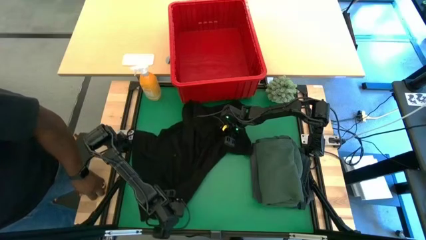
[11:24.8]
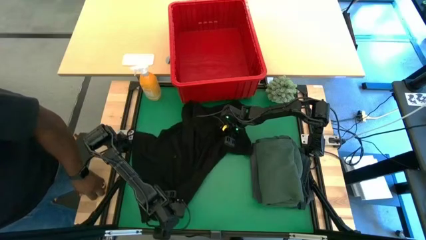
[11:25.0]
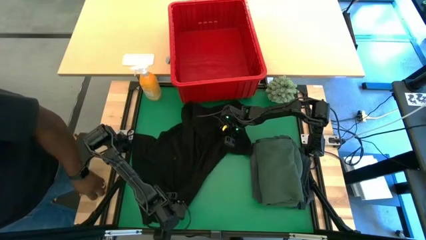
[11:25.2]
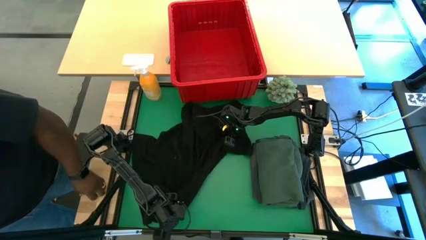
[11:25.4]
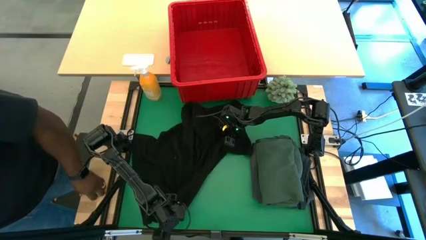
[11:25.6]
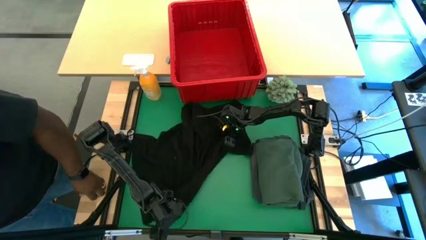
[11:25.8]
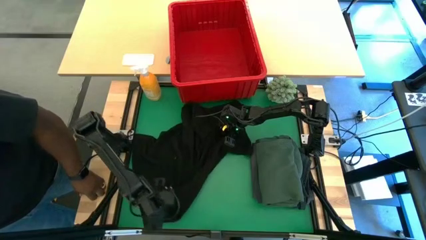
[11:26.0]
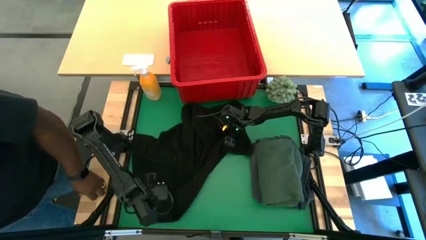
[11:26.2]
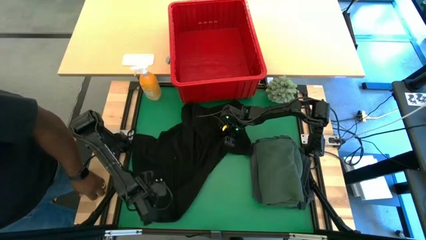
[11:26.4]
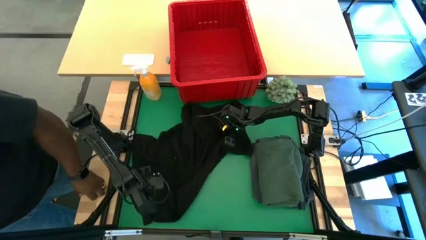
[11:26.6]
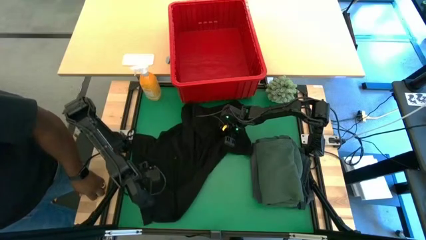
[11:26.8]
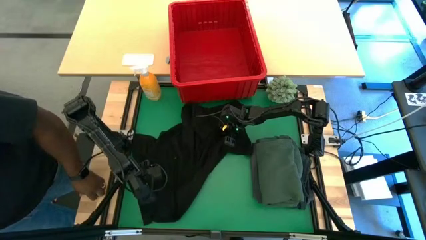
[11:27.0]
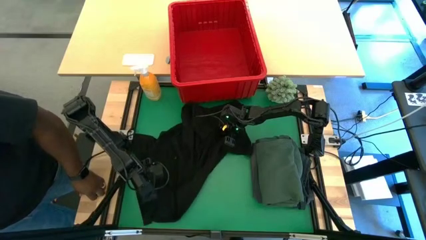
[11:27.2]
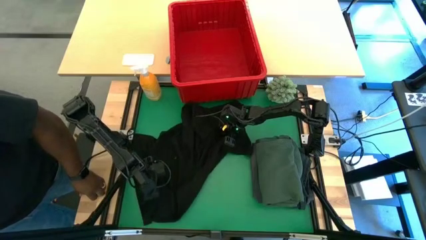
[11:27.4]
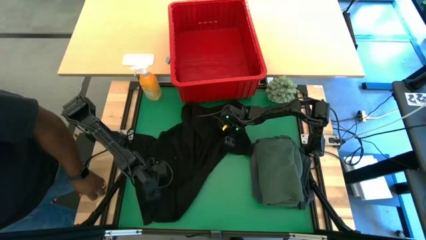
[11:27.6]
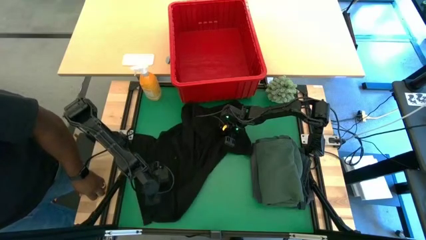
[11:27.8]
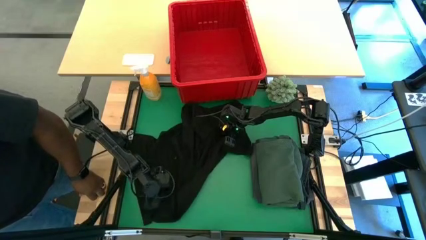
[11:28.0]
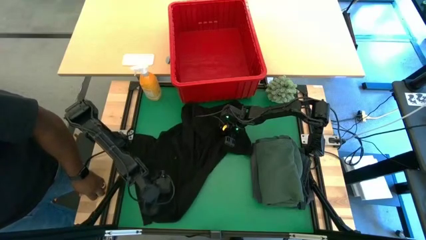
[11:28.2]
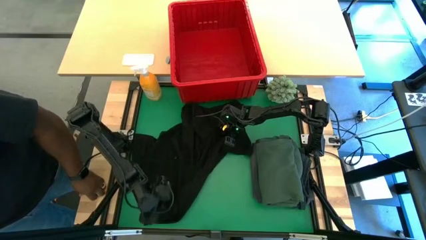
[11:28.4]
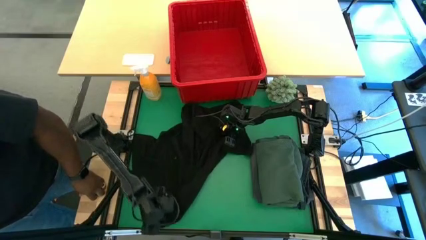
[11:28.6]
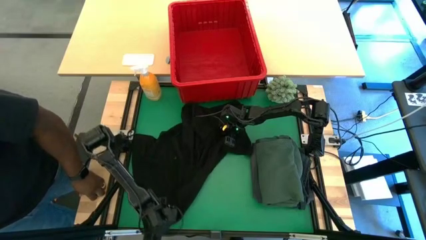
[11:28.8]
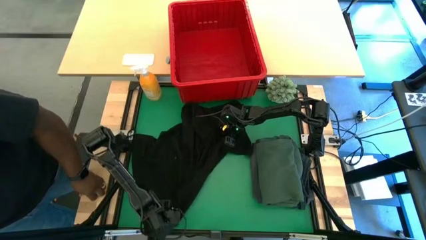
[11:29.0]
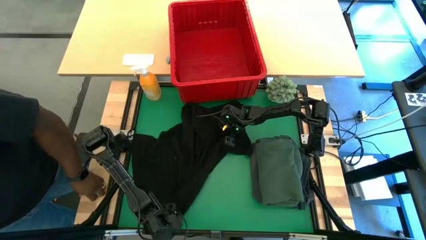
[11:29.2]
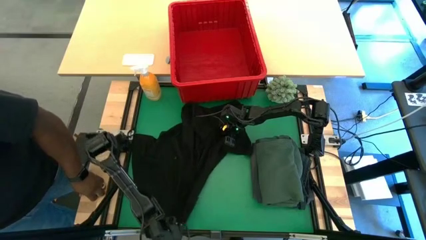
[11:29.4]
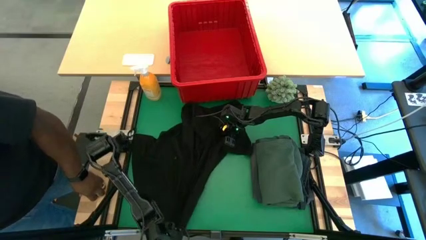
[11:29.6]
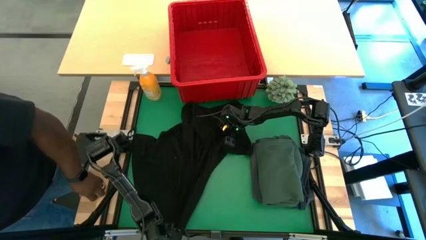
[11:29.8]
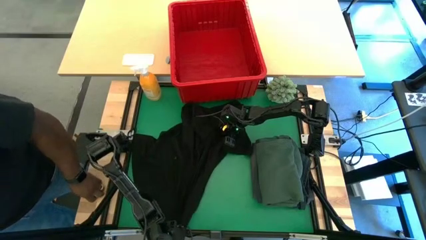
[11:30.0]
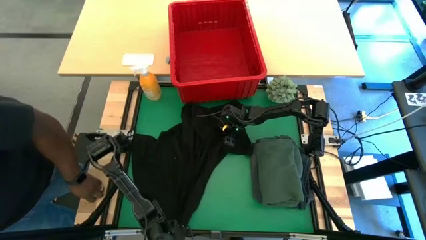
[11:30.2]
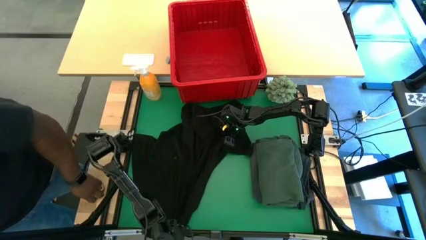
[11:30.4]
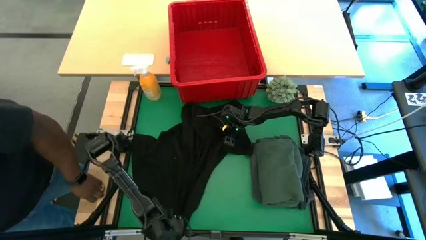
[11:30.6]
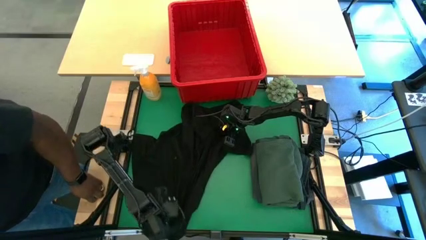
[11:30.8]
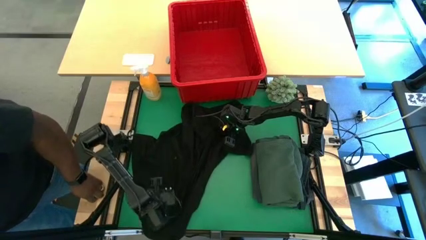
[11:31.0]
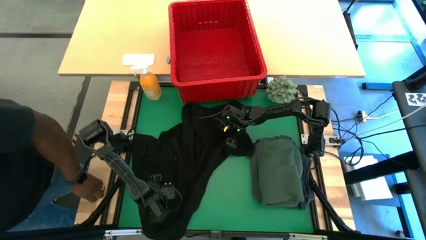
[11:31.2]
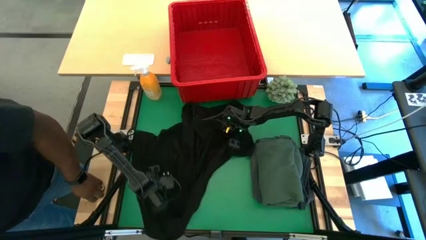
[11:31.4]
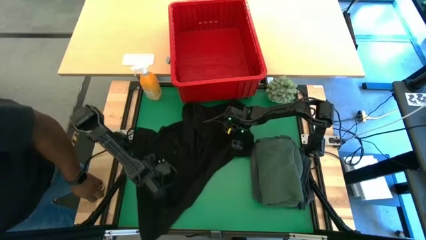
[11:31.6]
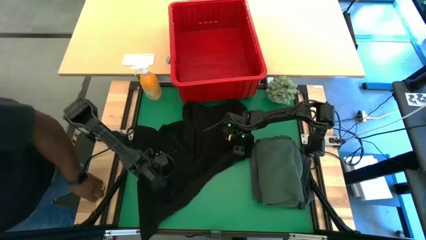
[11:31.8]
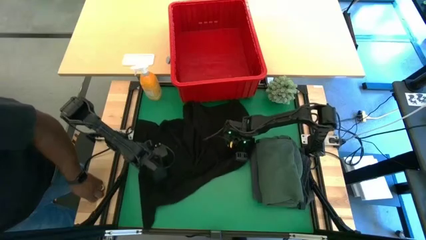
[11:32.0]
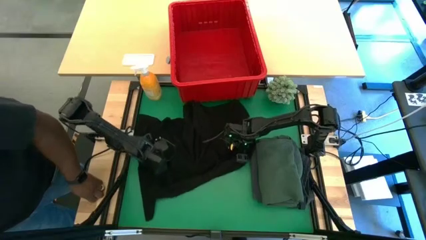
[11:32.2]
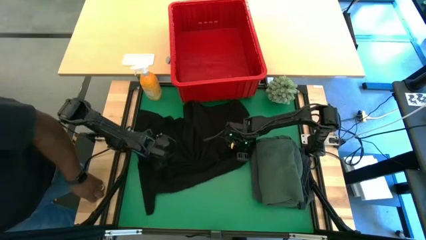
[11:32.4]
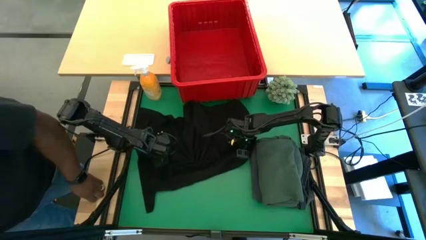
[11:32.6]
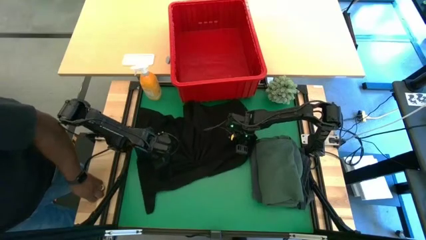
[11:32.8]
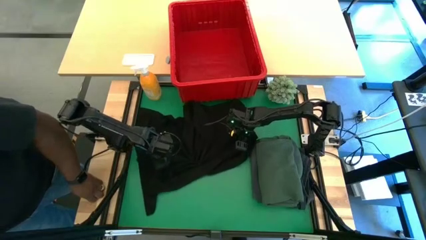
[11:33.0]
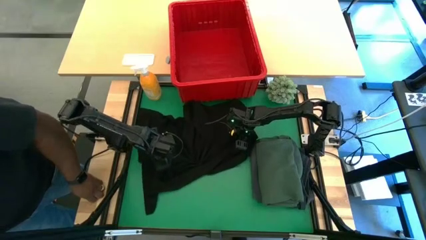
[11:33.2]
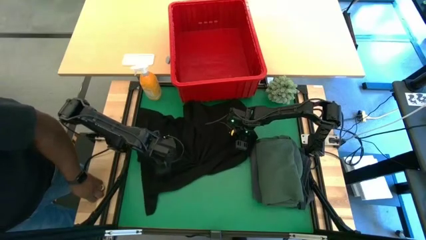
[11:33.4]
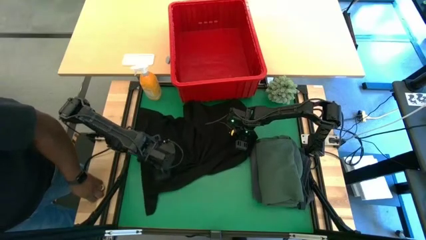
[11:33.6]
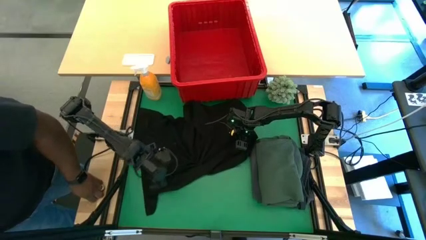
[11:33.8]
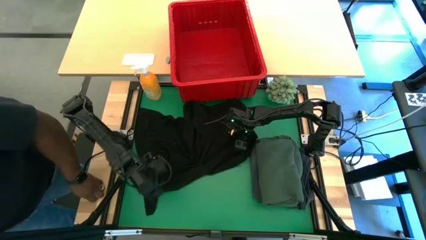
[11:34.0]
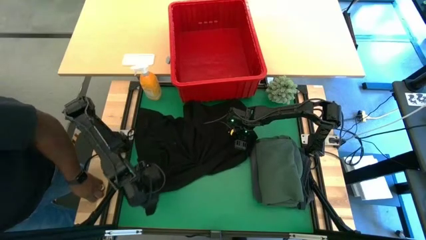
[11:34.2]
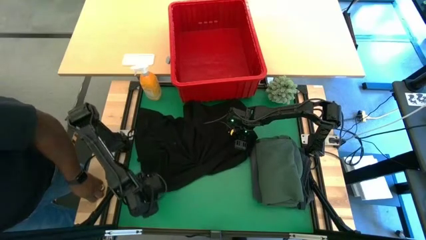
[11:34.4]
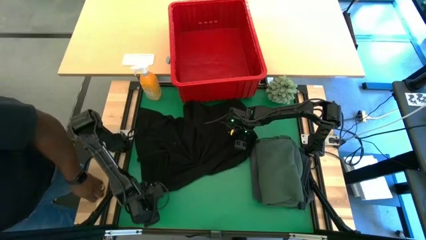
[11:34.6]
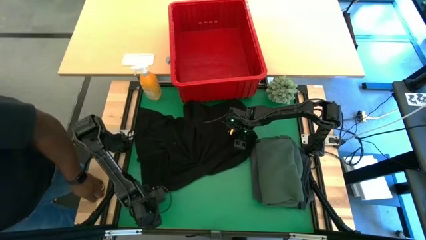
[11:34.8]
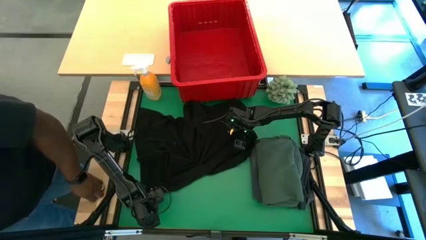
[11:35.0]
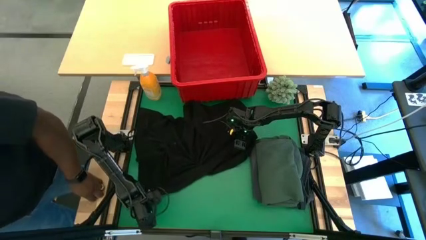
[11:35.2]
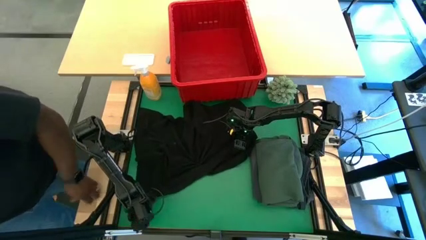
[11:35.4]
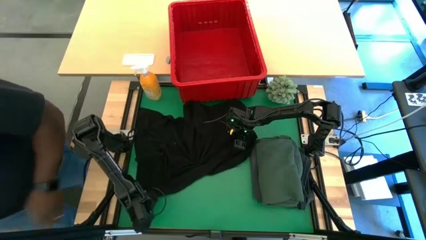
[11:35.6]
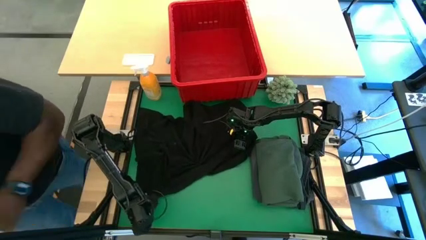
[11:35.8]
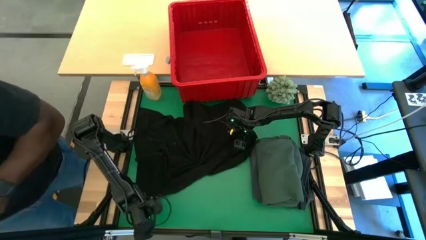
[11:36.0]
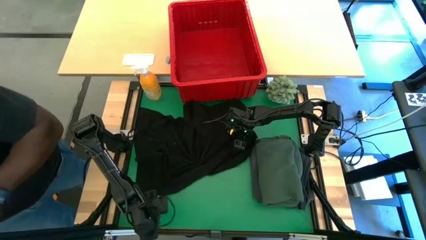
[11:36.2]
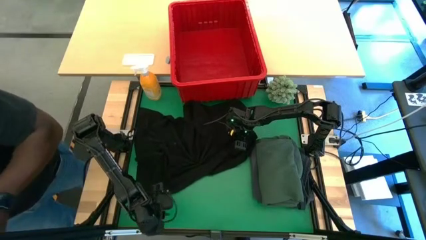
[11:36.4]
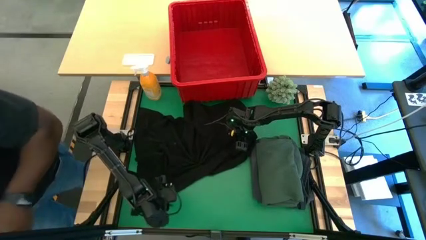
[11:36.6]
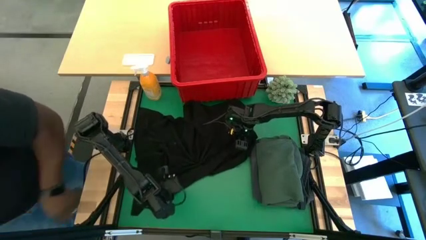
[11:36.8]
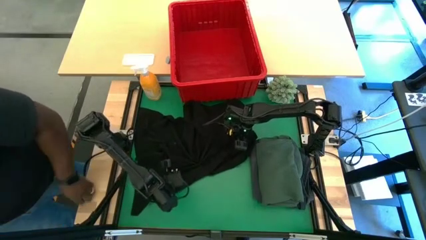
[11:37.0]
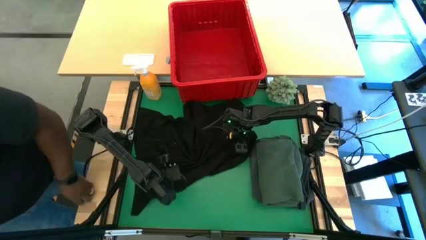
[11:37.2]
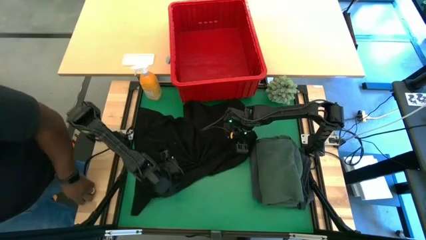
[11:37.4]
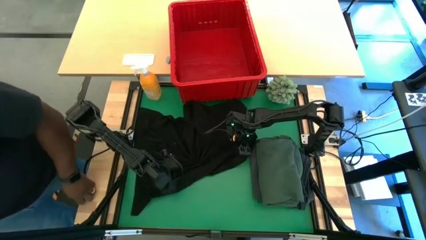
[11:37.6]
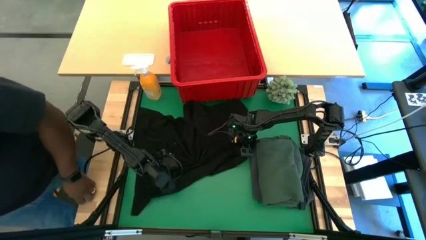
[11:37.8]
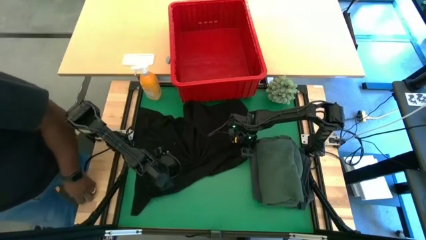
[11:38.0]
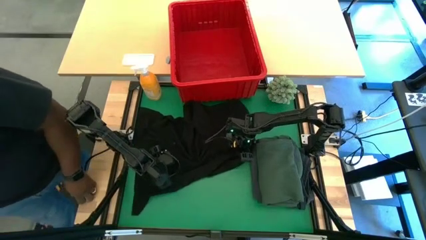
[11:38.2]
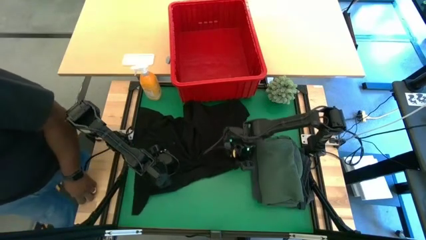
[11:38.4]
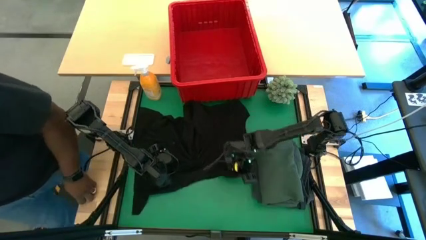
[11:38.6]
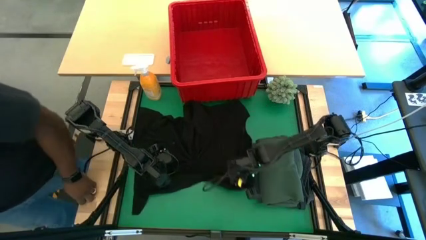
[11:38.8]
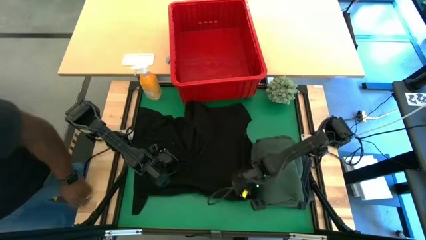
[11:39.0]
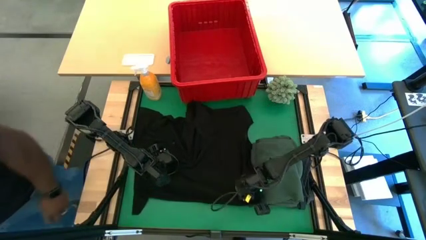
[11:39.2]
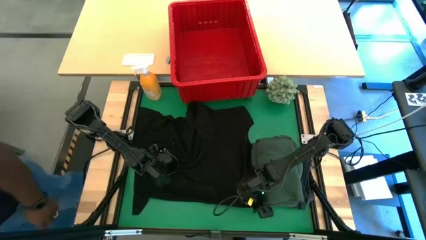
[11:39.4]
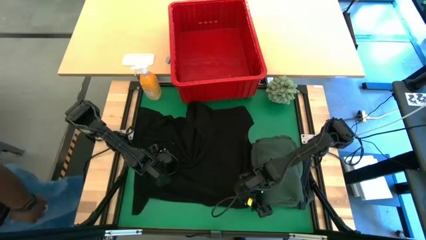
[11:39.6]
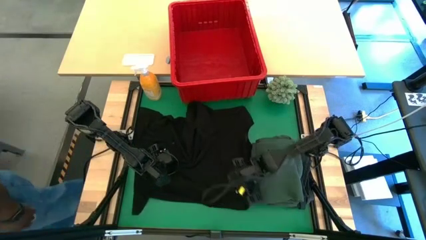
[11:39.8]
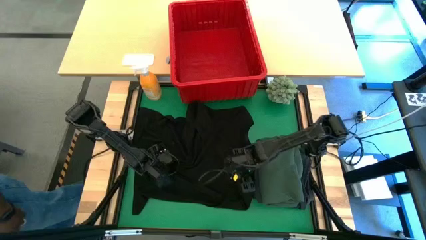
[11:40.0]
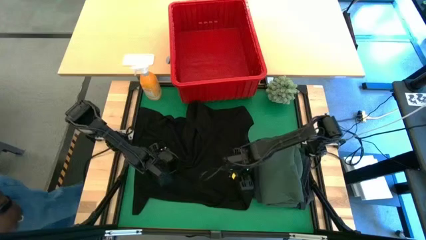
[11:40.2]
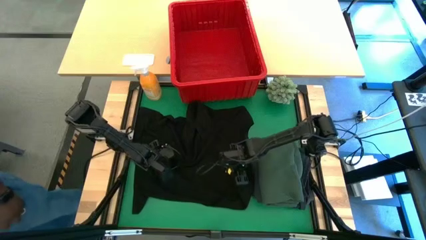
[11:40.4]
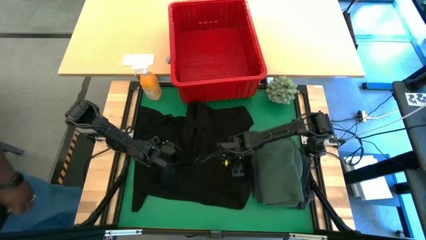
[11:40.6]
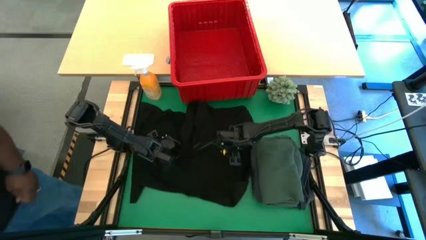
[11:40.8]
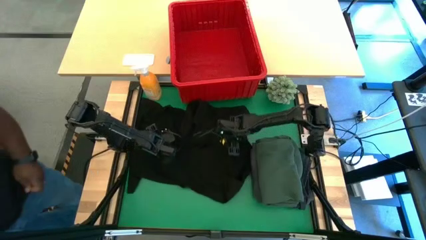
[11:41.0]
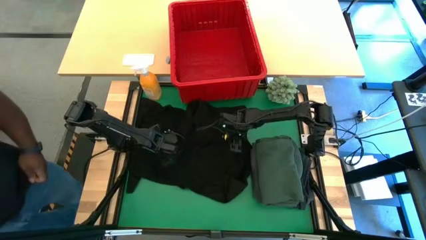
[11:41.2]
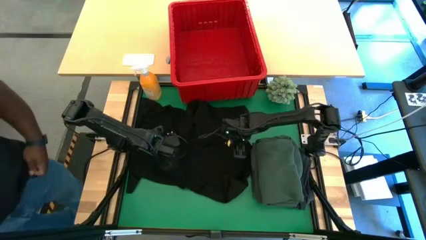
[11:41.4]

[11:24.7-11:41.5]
Task: Fold Laundry from Bin
Fold the black shirt
